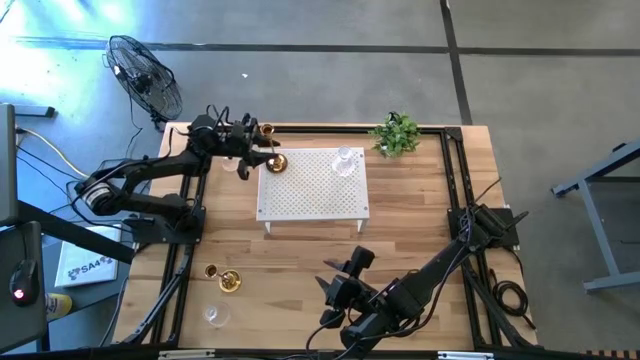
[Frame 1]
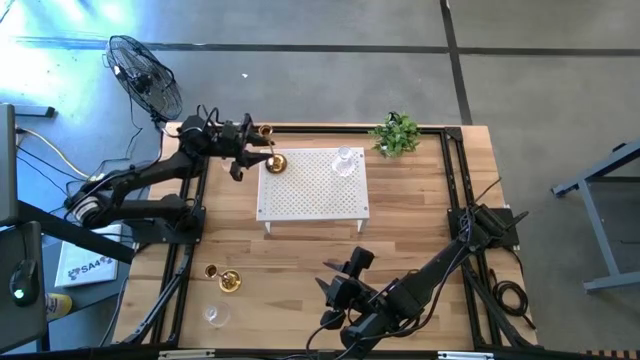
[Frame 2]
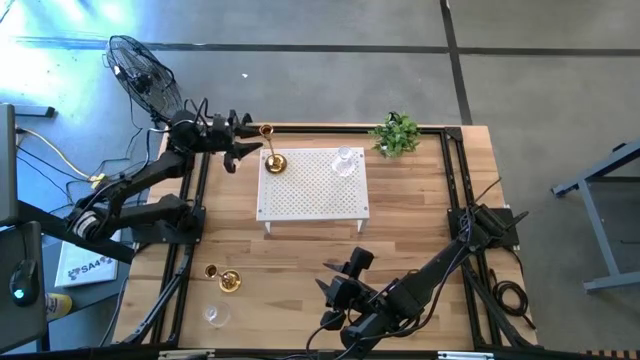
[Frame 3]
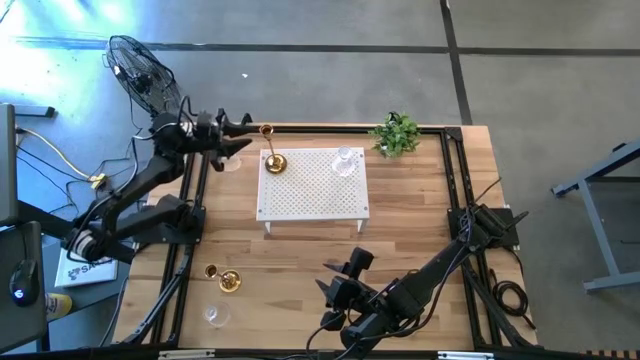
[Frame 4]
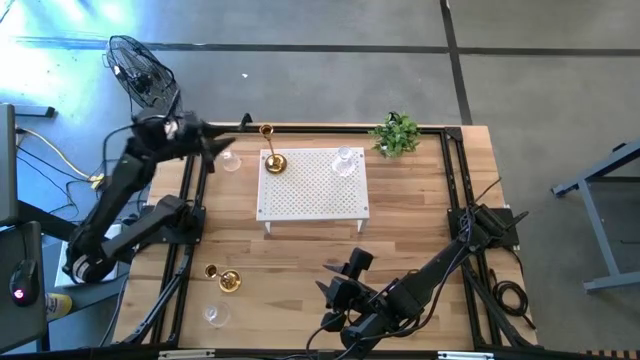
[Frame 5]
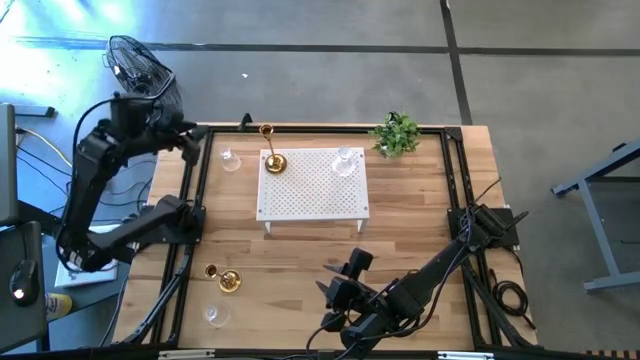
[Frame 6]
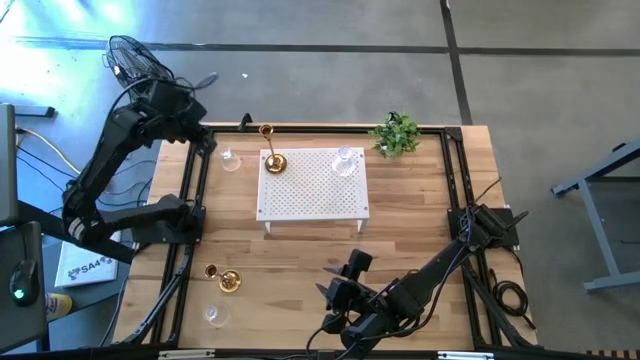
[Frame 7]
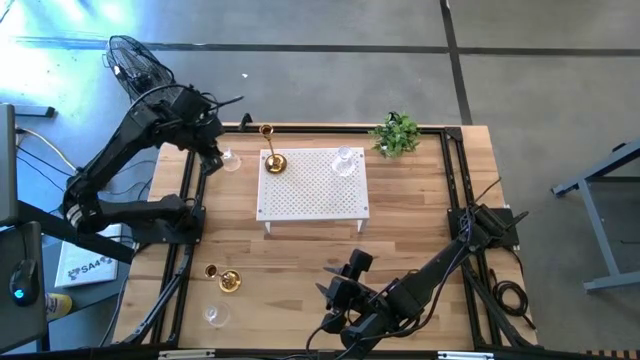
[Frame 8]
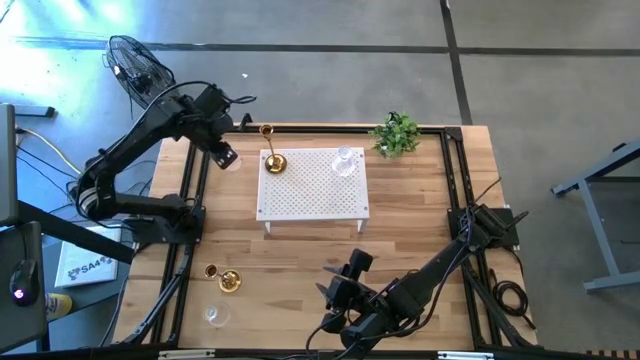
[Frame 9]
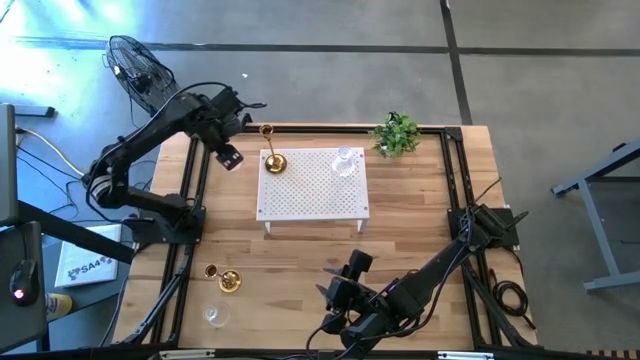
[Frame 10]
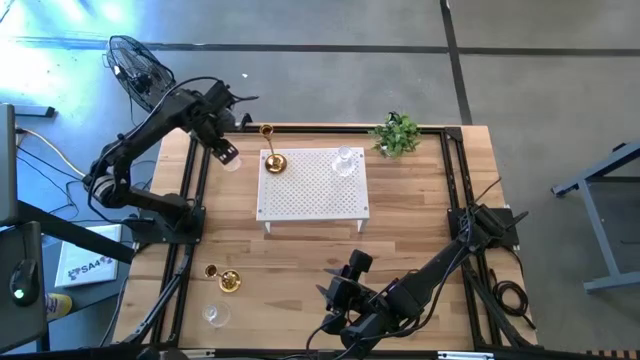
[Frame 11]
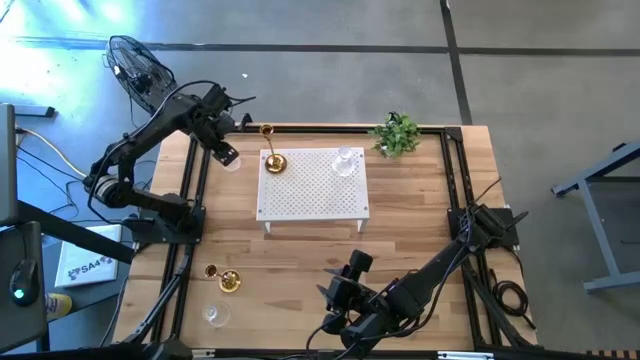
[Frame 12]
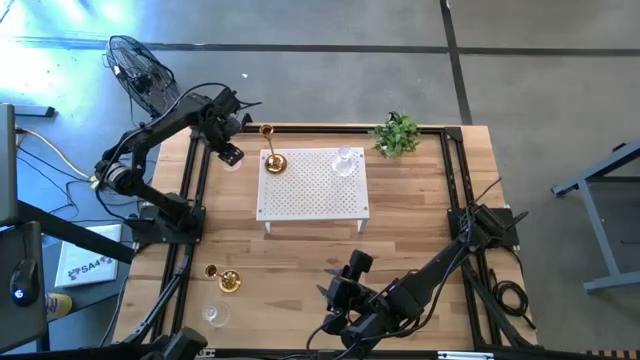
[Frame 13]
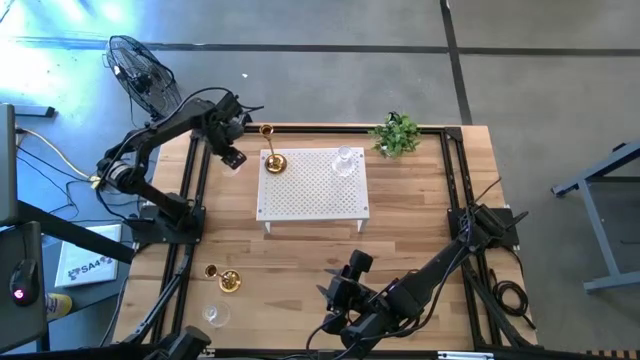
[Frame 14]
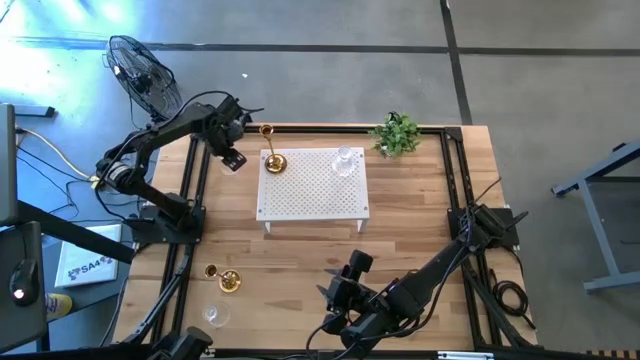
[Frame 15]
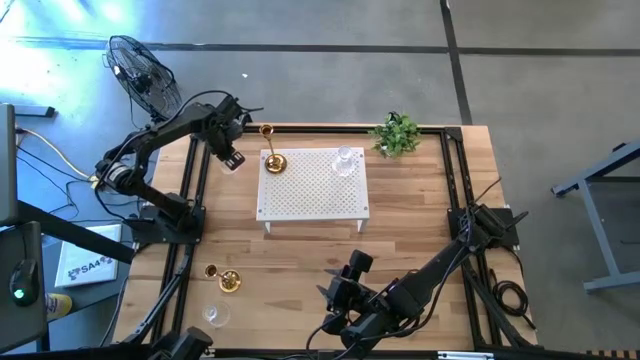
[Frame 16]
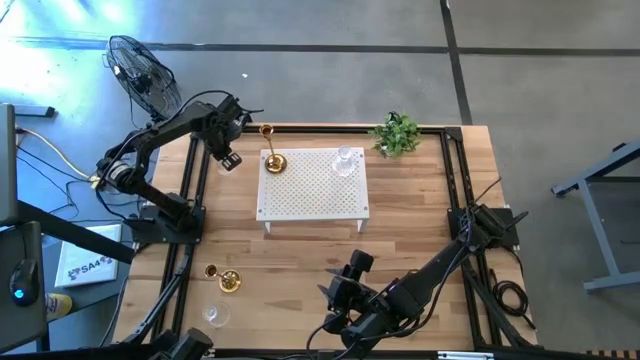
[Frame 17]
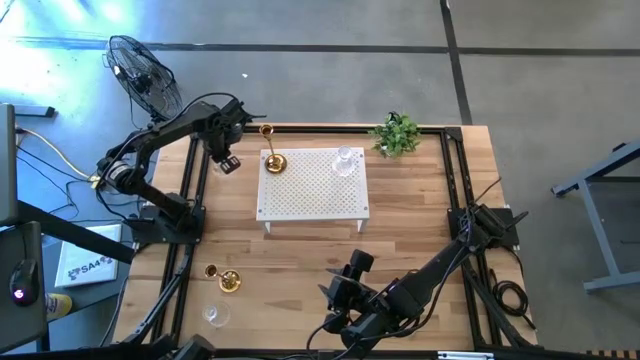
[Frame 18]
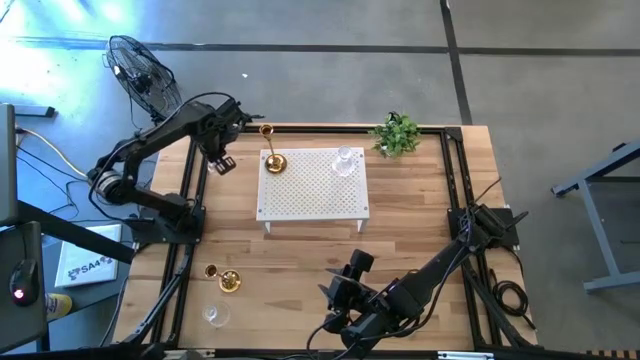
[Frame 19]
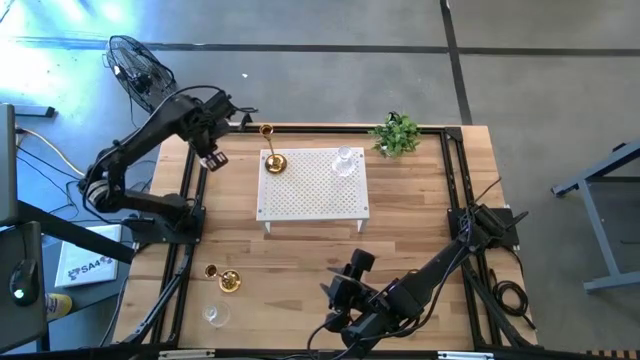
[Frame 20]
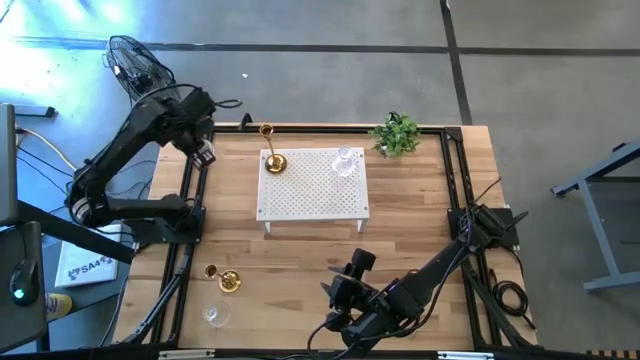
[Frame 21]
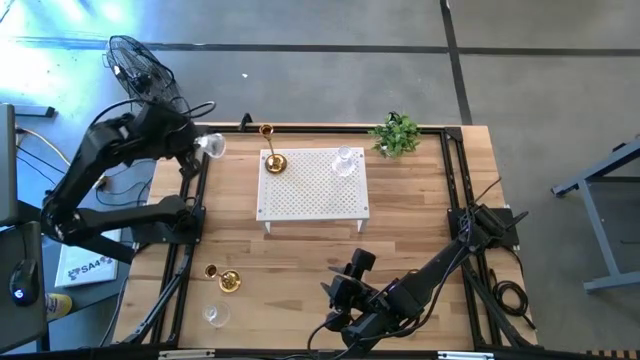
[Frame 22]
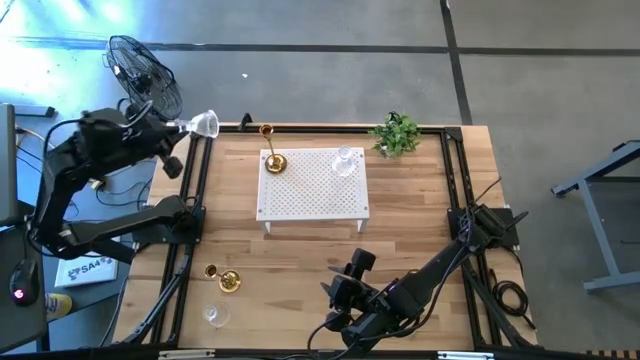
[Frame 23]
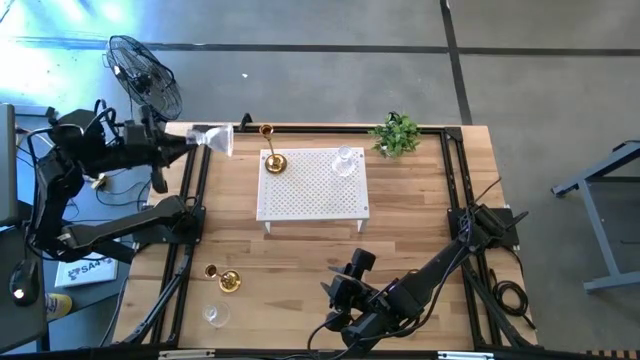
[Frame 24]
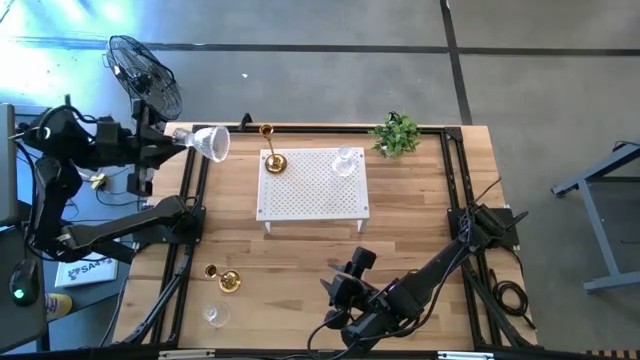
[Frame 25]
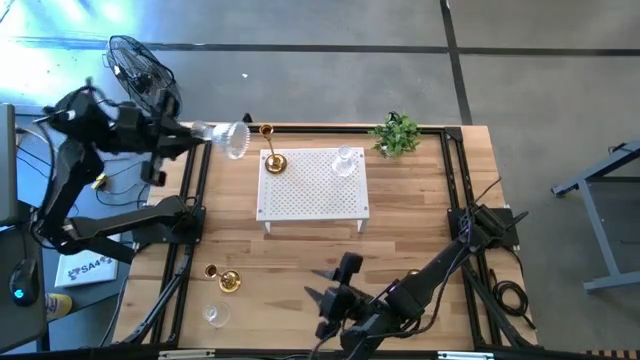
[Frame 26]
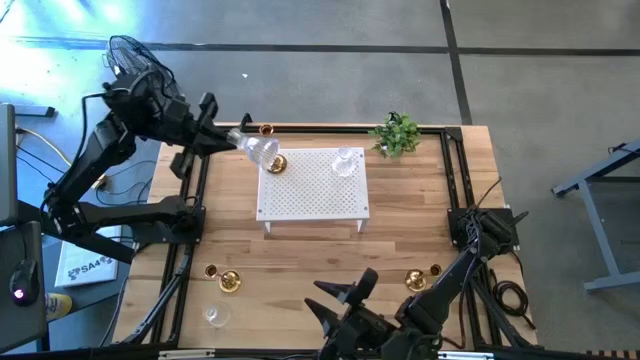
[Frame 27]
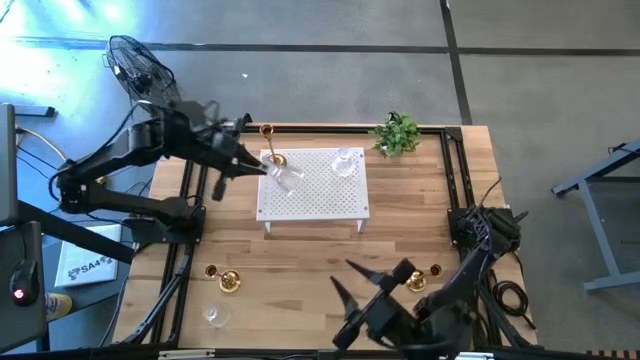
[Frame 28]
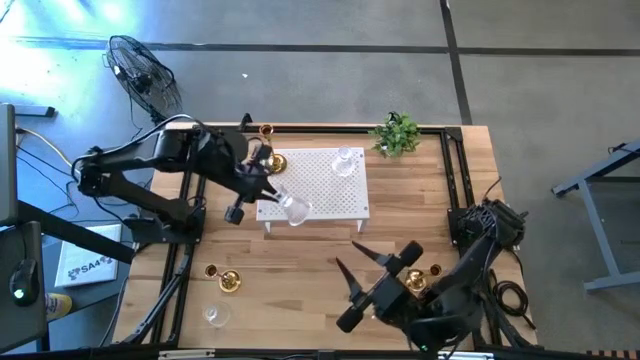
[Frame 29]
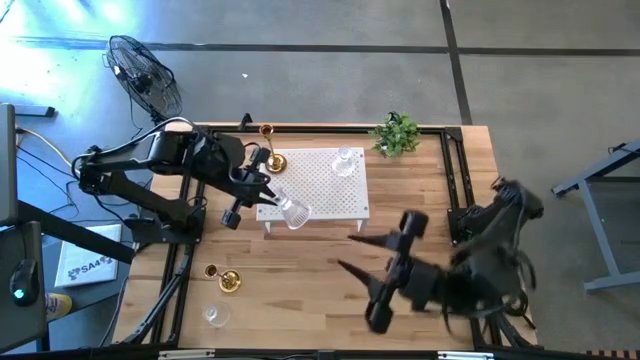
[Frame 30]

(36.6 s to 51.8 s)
Task: Pick & Place candle stick holders
Put the top transparent glass candle holder on the shelf aligned with the other transparent glass candle holder
